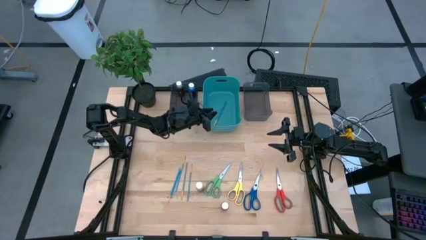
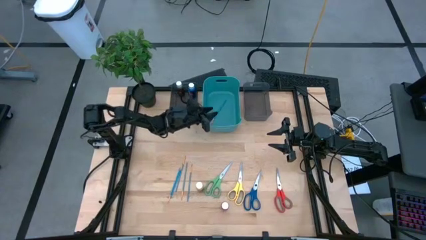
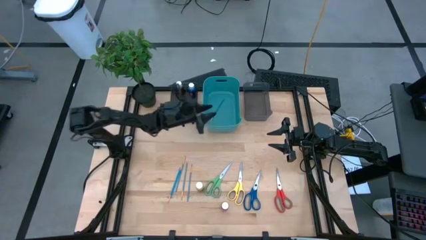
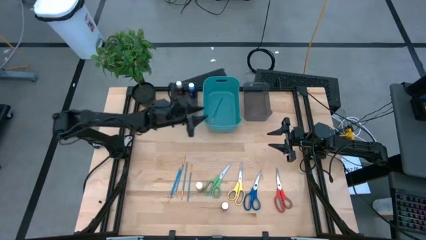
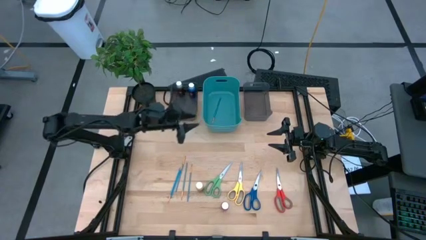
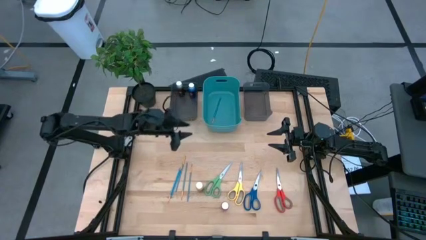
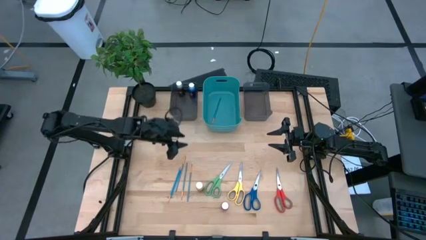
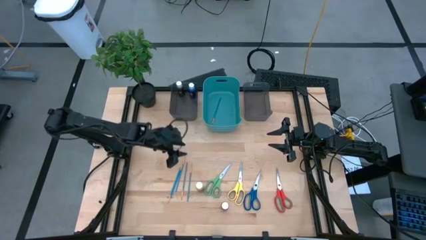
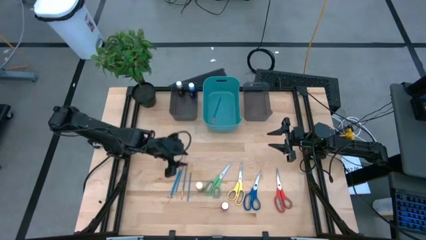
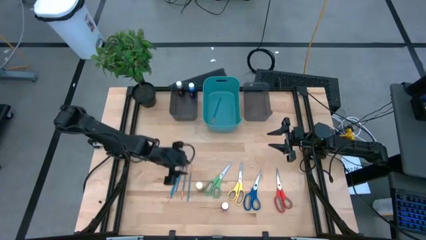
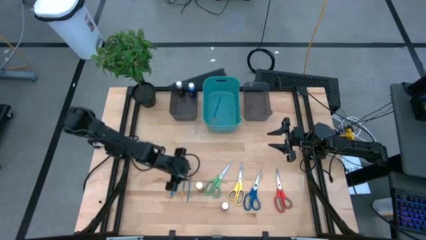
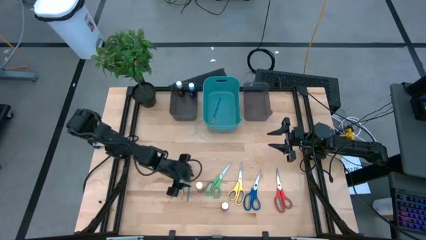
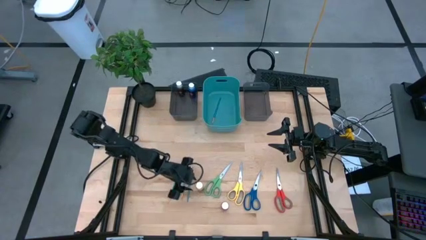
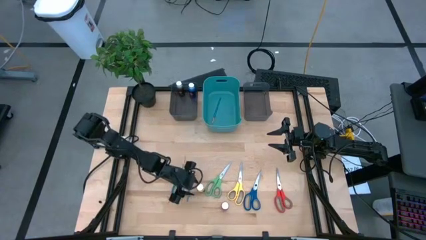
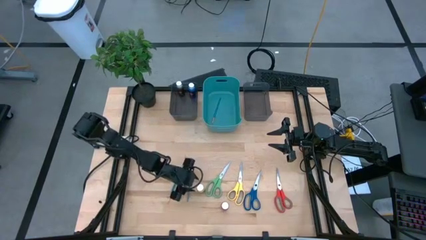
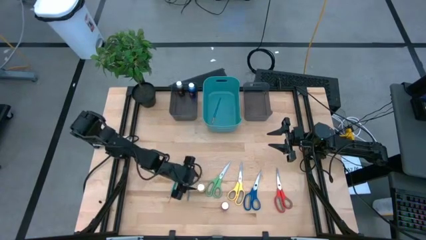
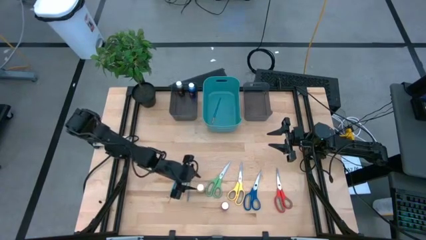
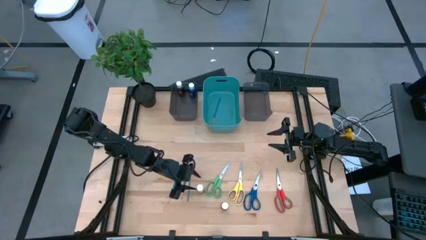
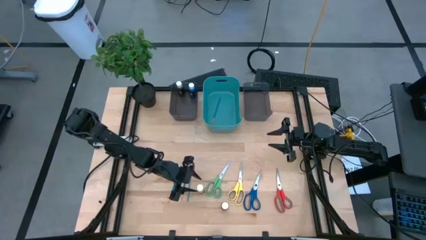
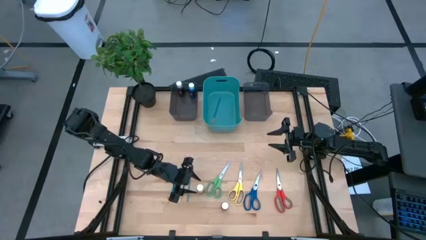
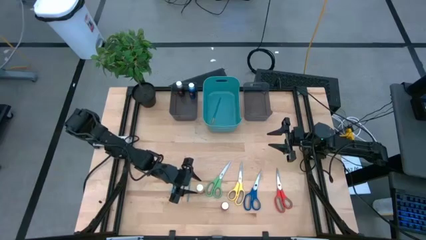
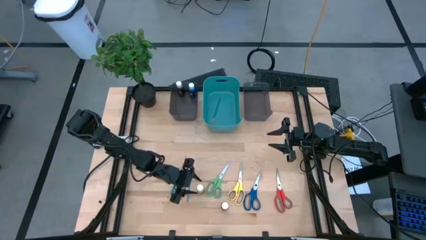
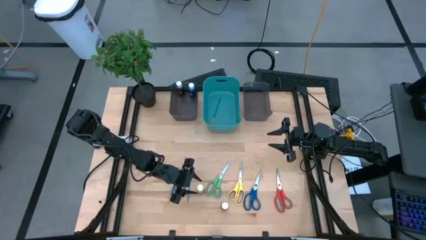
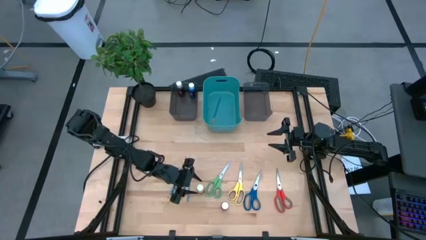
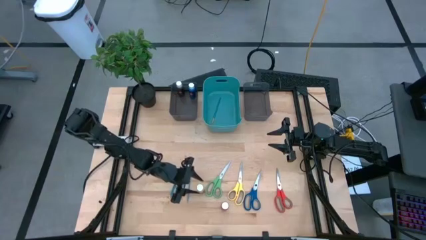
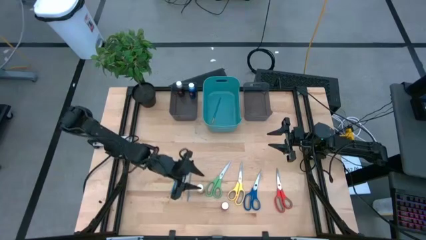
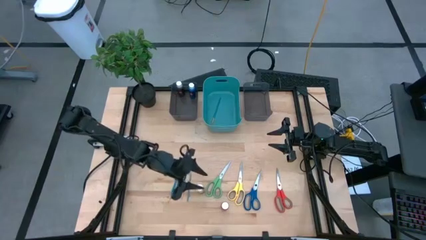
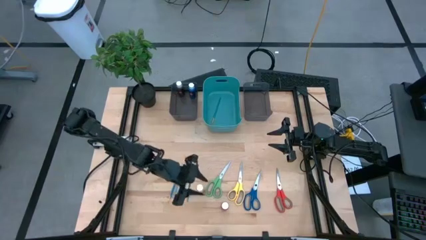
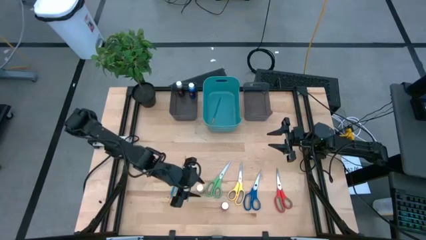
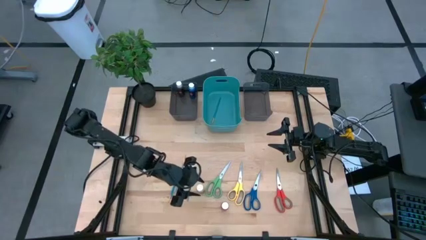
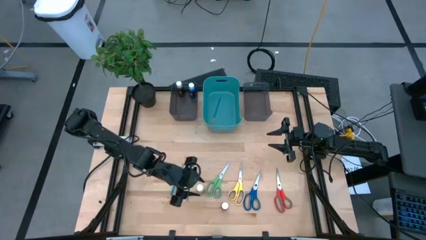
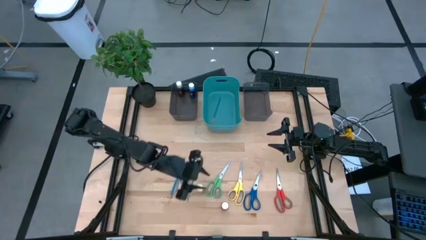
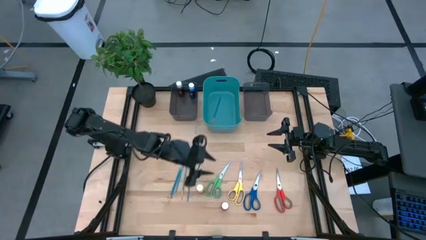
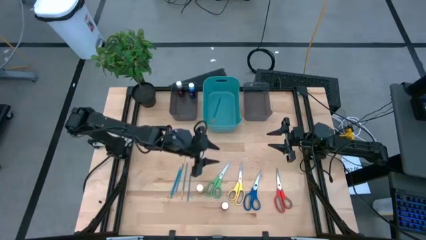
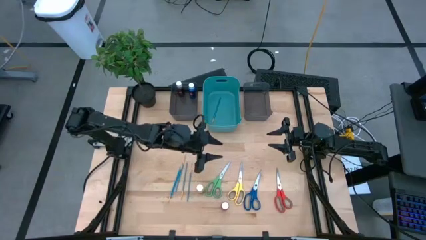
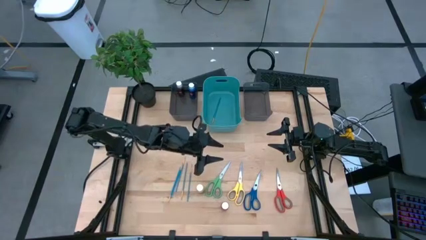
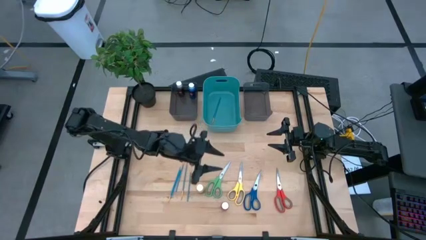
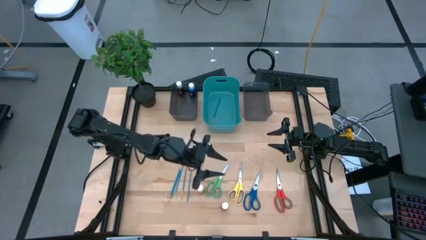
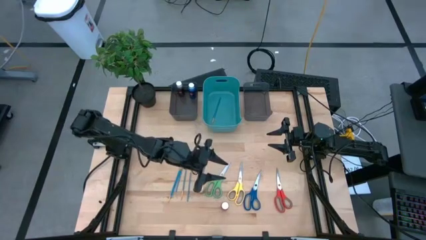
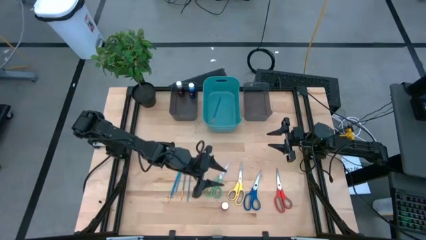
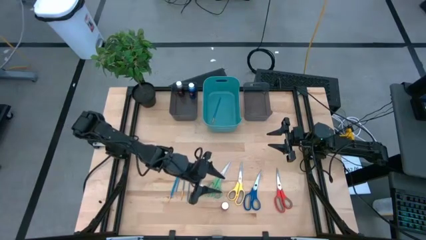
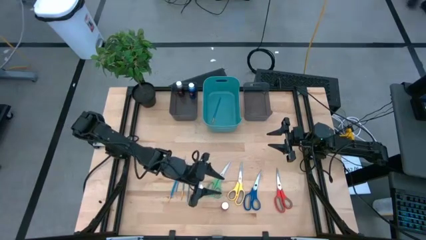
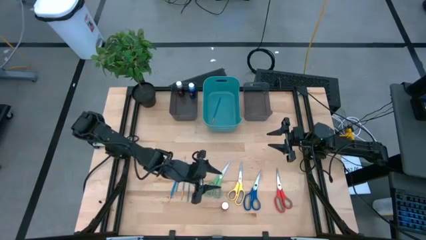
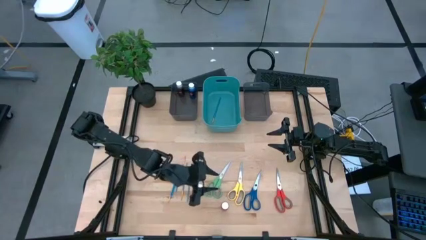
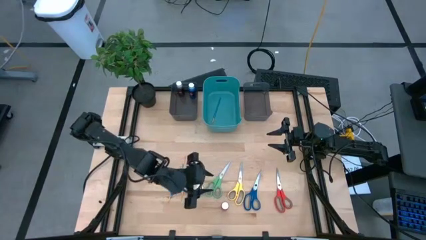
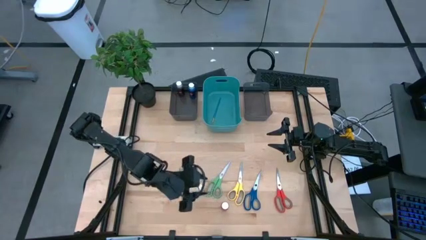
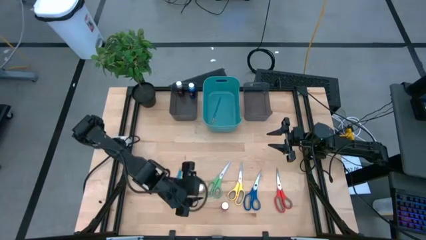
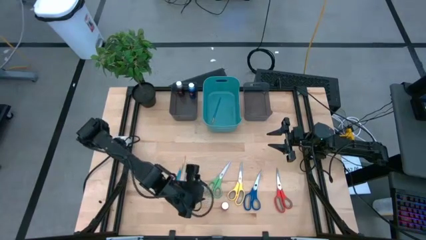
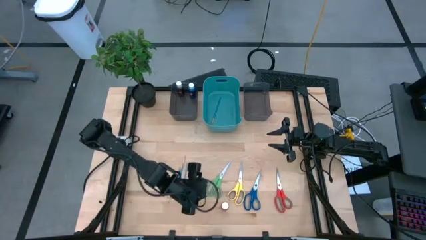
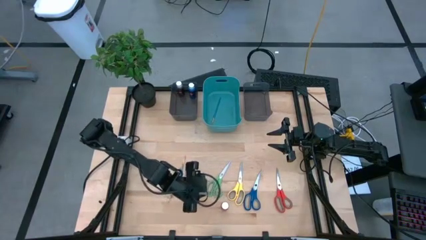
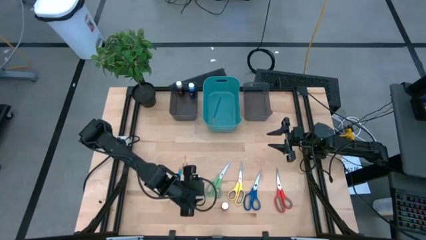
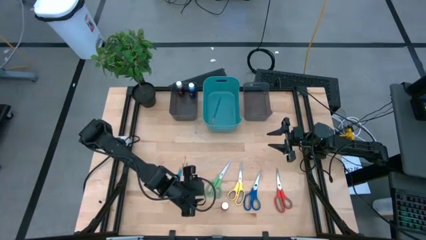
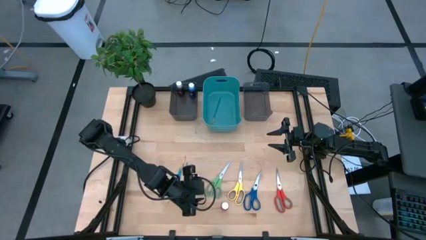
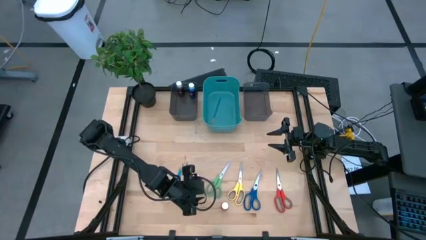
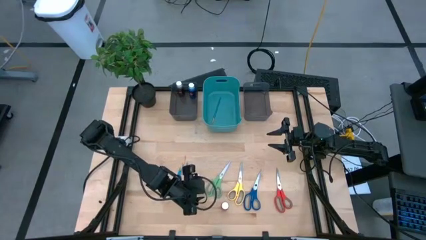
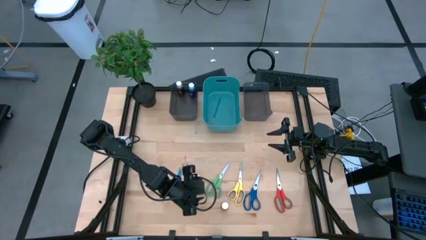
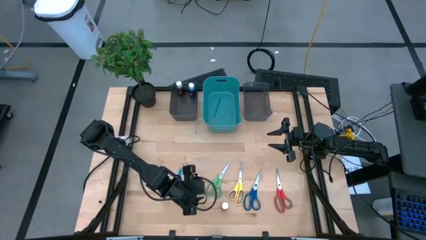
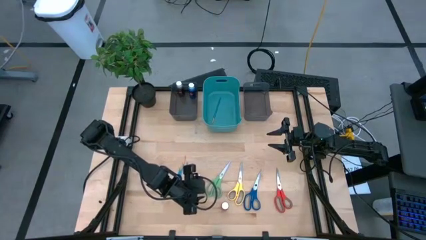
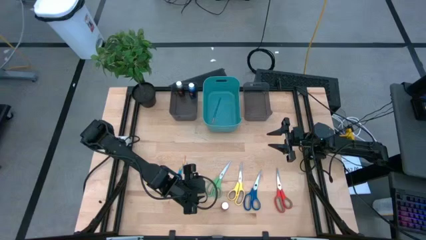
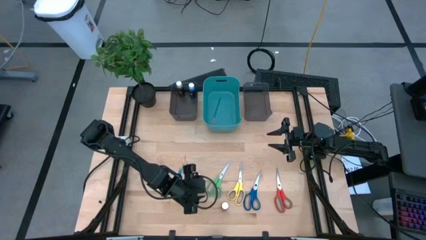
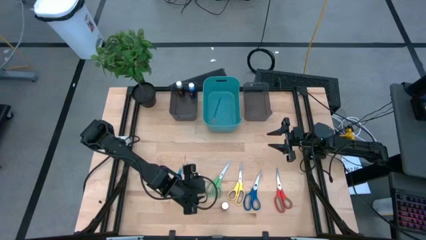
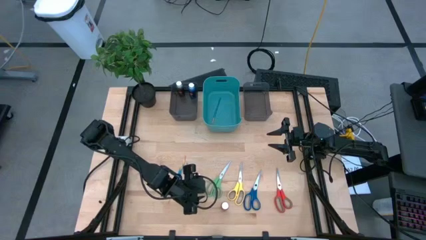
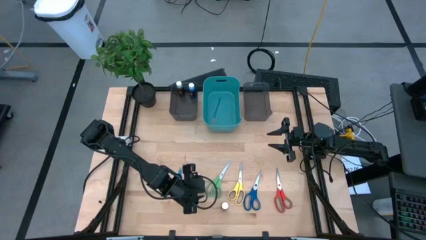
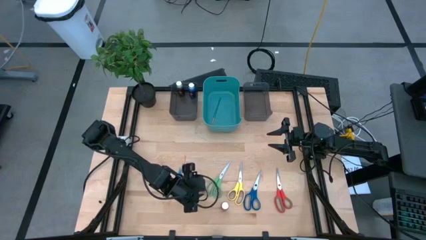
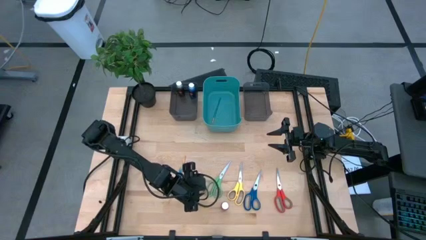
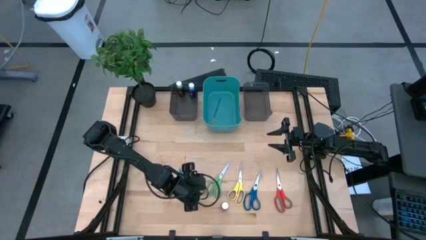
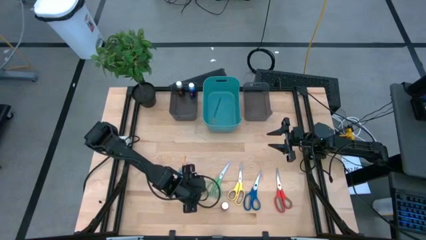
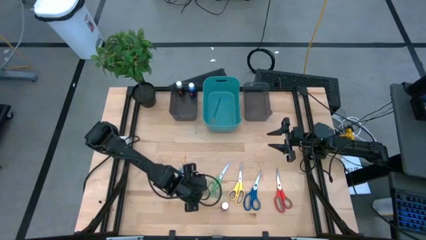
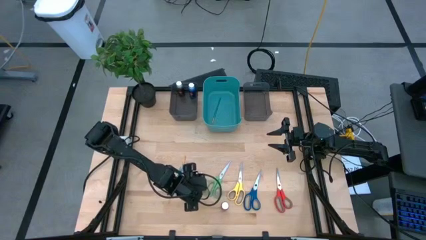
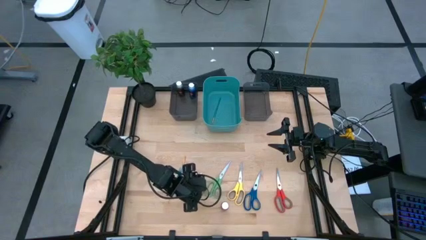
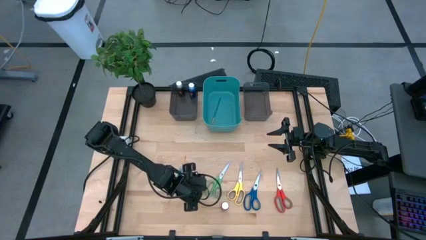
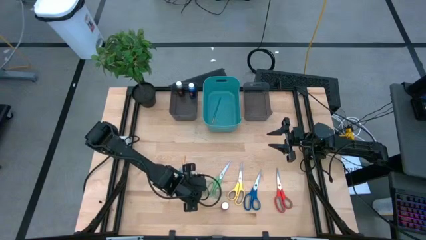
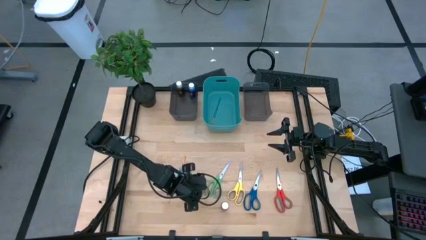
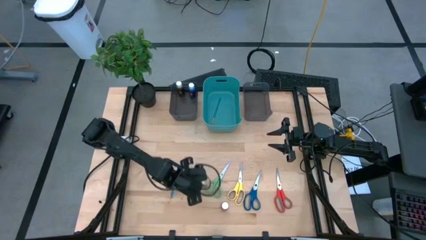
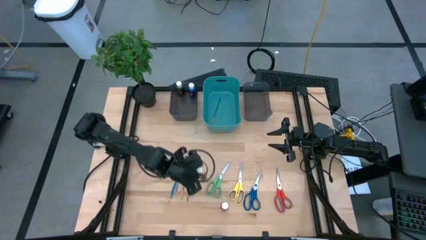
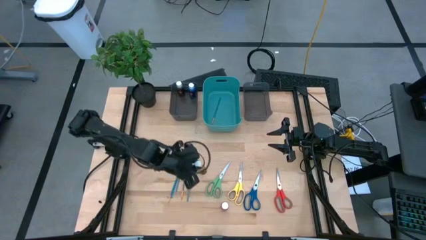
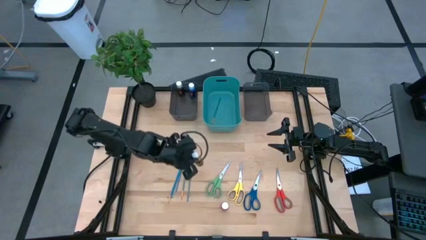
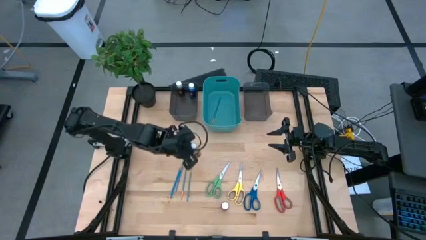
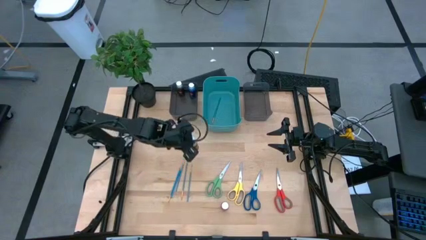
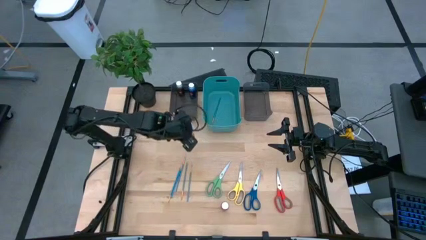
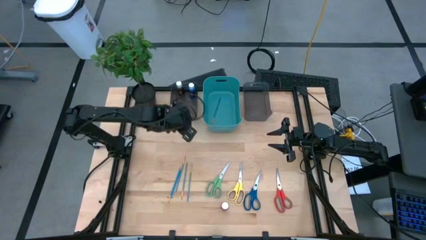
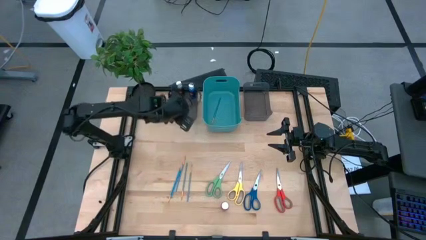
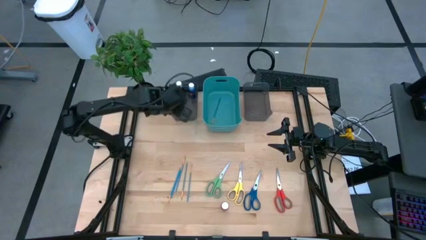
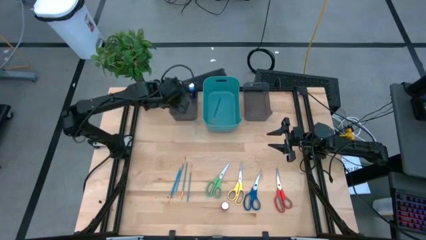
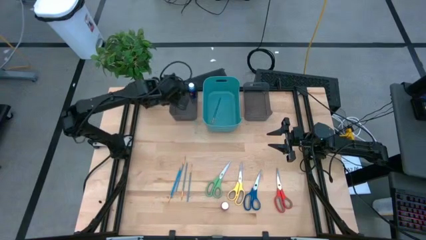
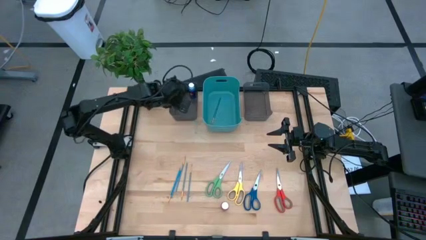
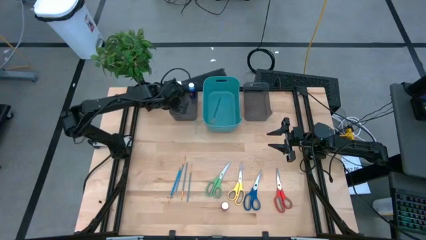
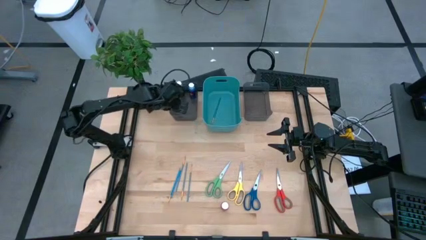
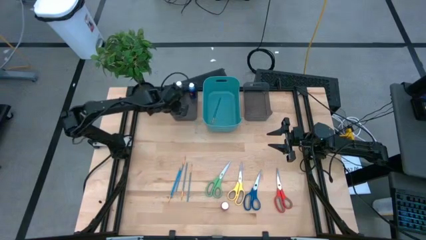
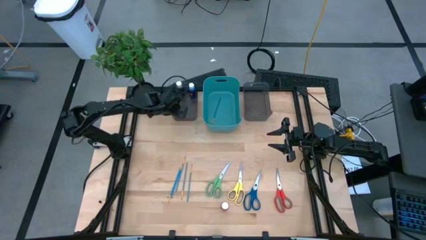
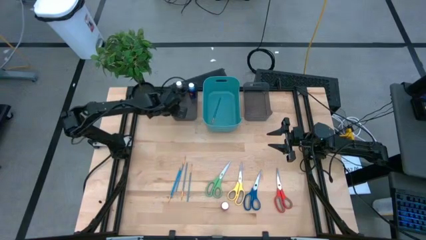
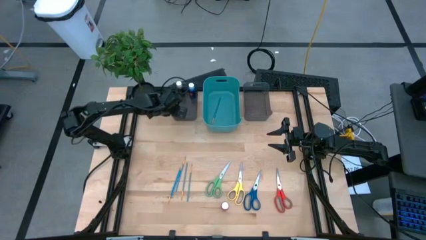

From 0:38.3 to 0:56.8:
Task: Pick & Place Paint Supplies
Put the yellow paint bottle into the left black bin
